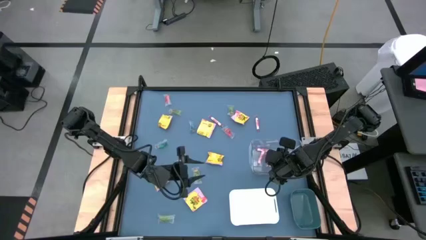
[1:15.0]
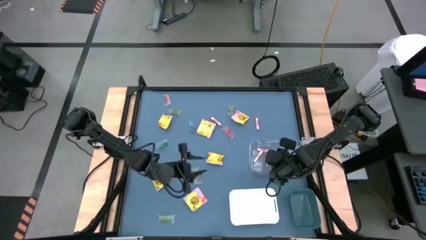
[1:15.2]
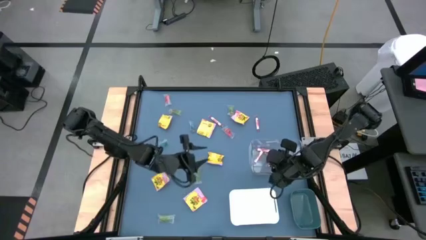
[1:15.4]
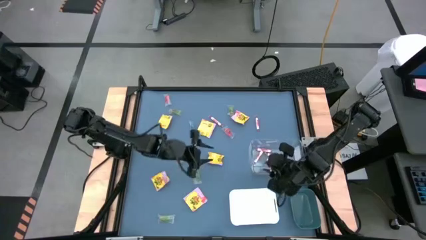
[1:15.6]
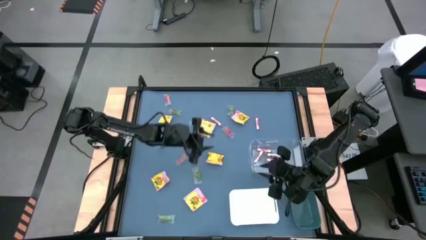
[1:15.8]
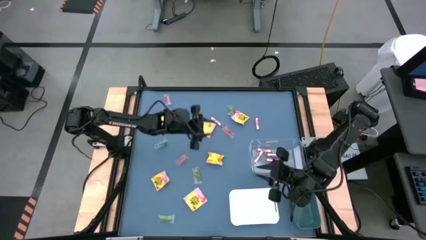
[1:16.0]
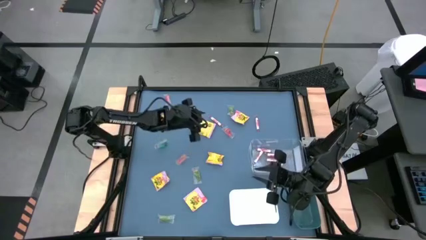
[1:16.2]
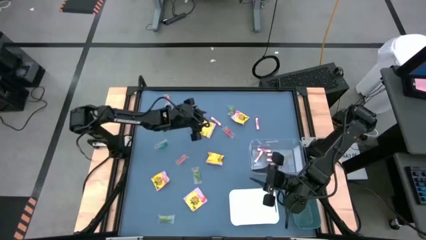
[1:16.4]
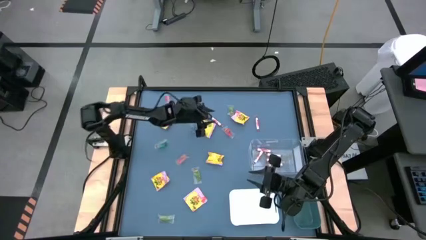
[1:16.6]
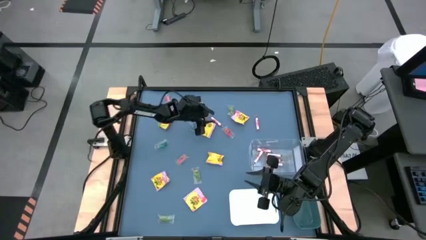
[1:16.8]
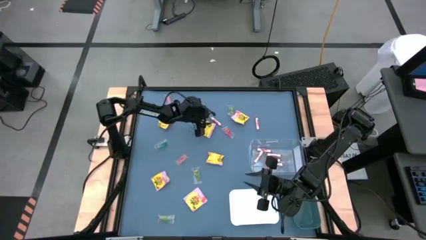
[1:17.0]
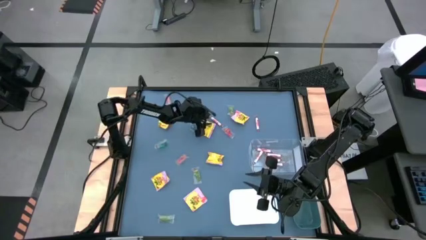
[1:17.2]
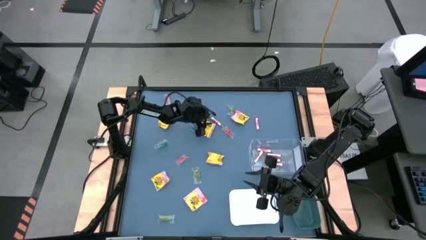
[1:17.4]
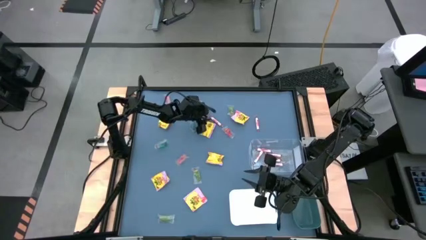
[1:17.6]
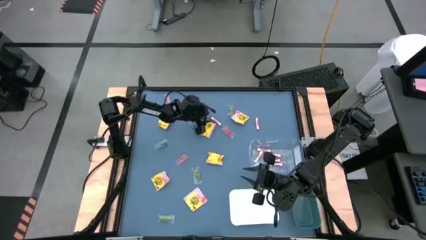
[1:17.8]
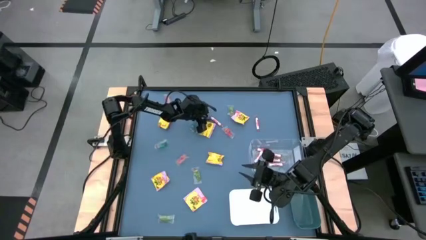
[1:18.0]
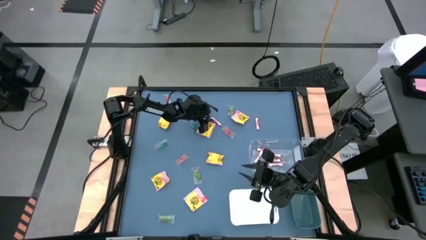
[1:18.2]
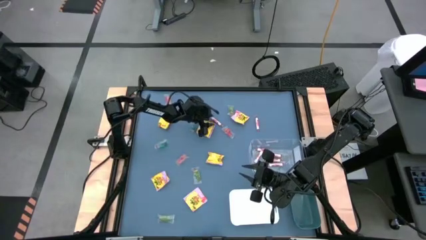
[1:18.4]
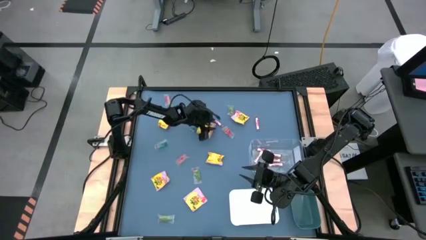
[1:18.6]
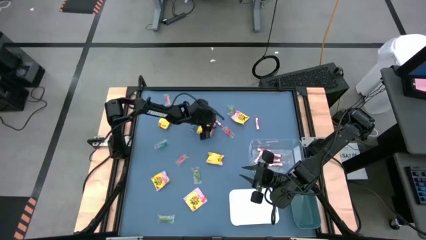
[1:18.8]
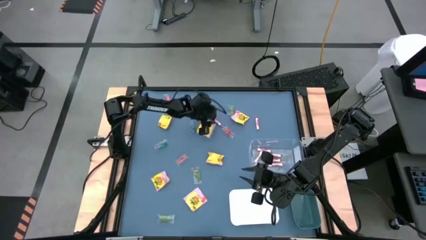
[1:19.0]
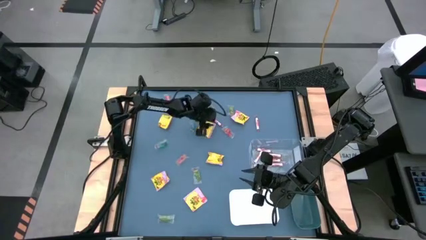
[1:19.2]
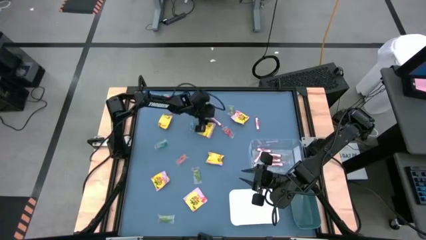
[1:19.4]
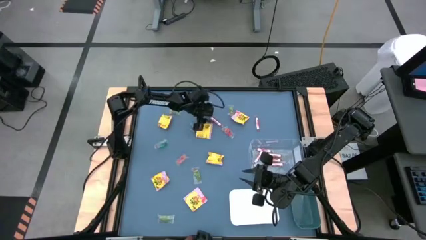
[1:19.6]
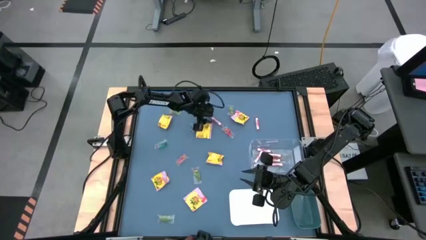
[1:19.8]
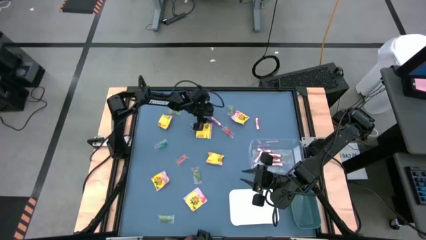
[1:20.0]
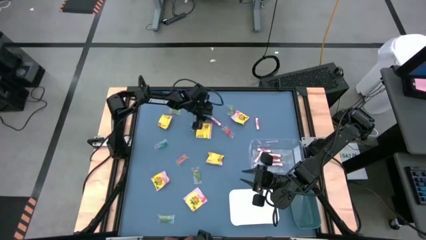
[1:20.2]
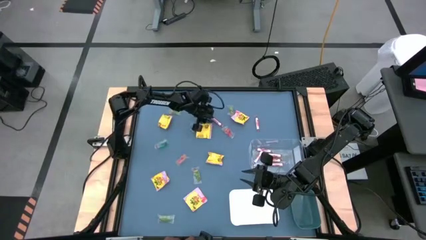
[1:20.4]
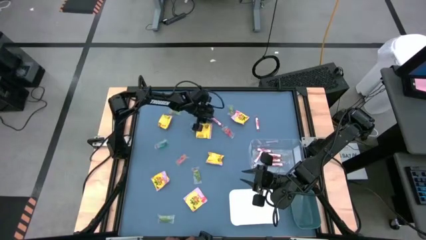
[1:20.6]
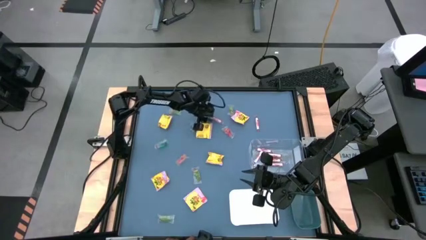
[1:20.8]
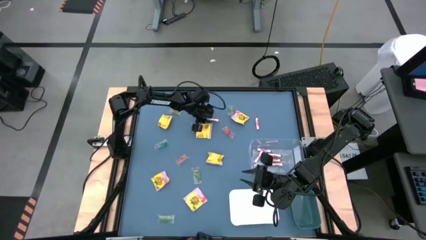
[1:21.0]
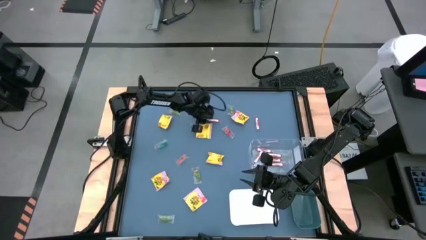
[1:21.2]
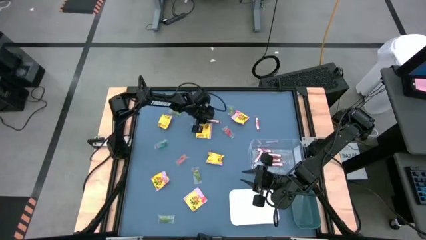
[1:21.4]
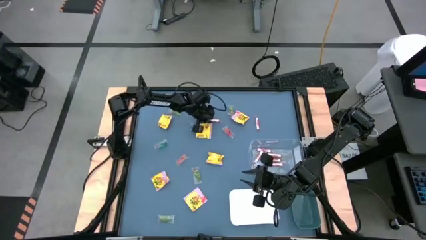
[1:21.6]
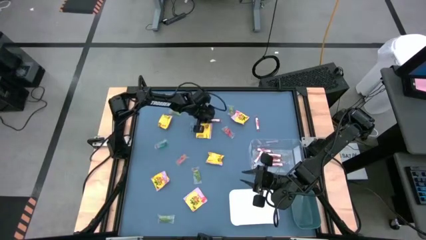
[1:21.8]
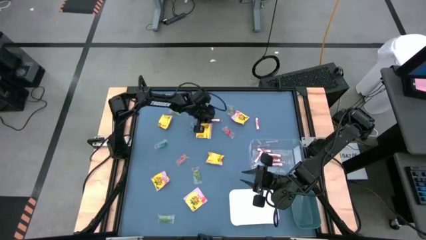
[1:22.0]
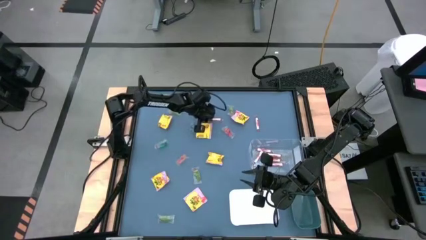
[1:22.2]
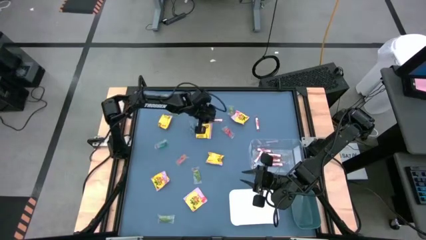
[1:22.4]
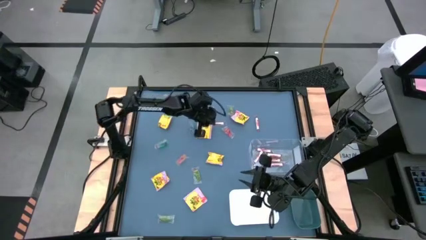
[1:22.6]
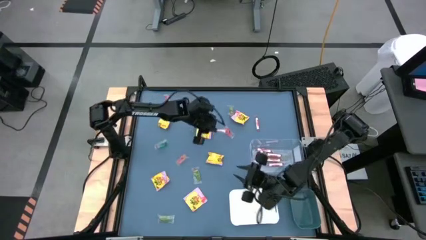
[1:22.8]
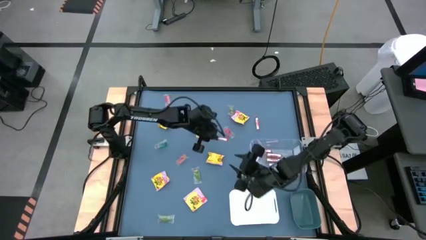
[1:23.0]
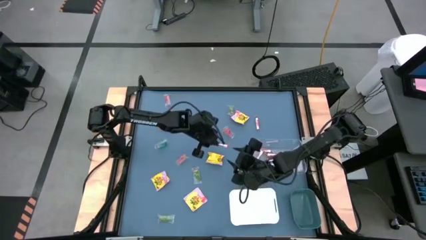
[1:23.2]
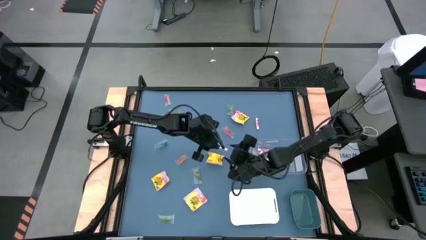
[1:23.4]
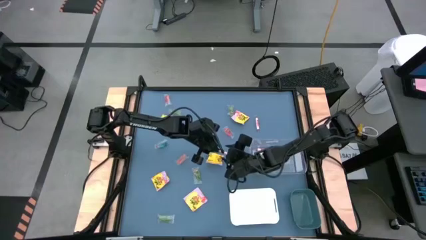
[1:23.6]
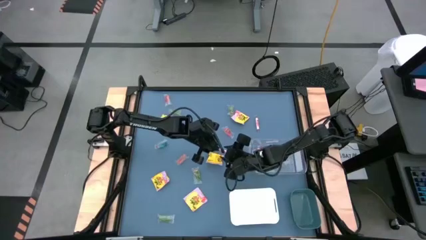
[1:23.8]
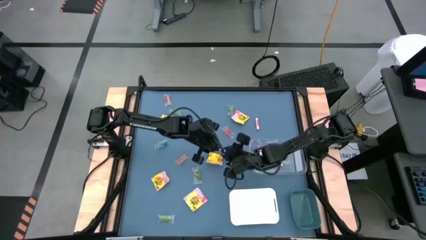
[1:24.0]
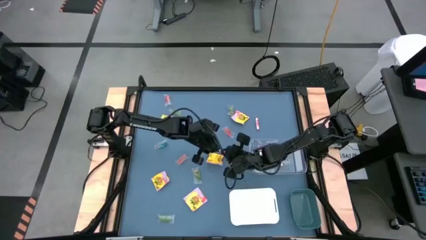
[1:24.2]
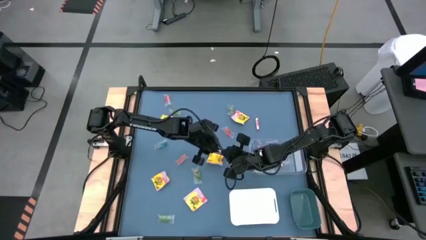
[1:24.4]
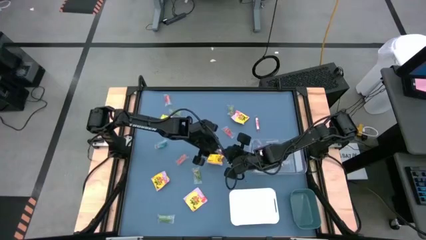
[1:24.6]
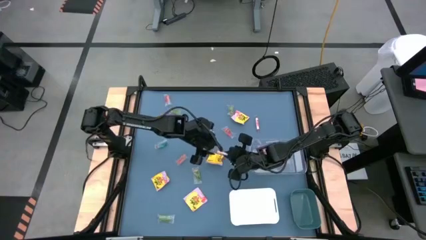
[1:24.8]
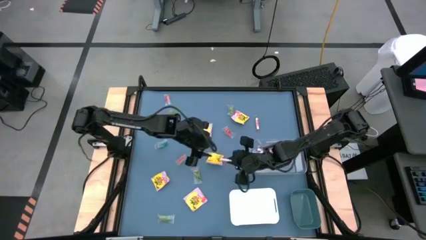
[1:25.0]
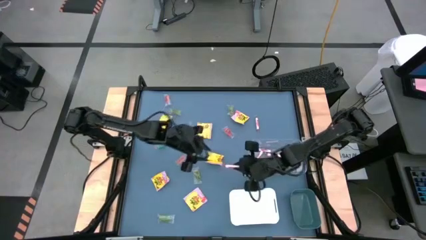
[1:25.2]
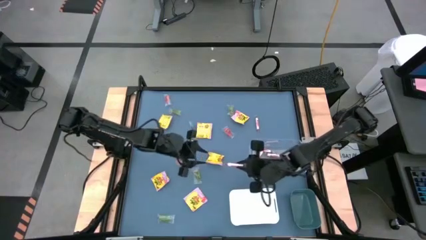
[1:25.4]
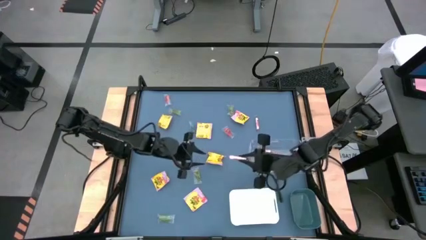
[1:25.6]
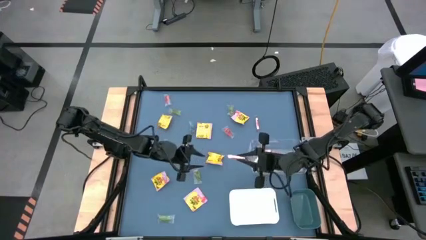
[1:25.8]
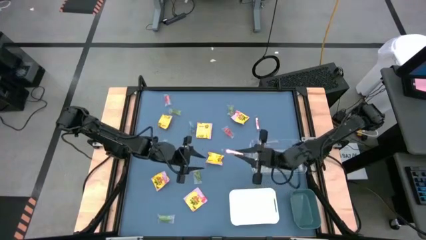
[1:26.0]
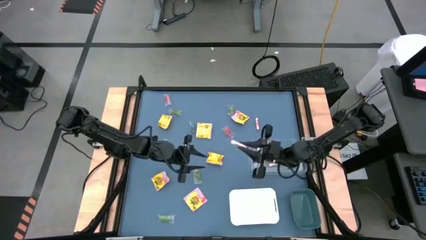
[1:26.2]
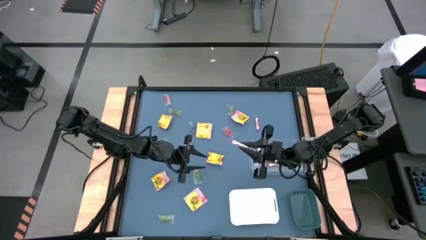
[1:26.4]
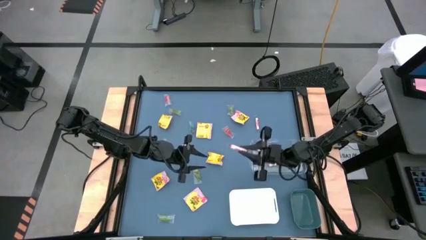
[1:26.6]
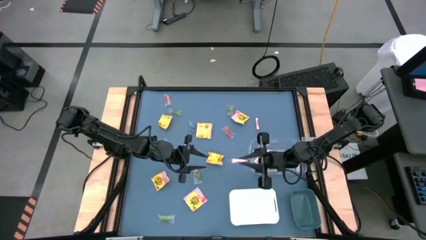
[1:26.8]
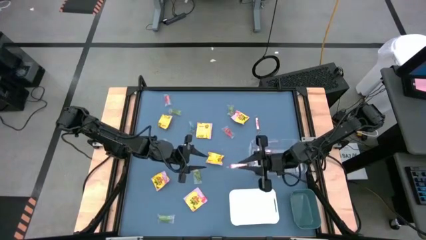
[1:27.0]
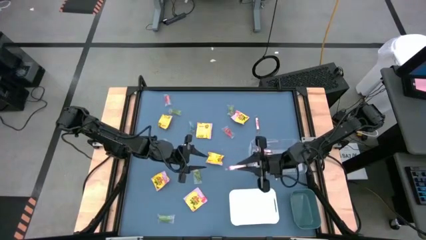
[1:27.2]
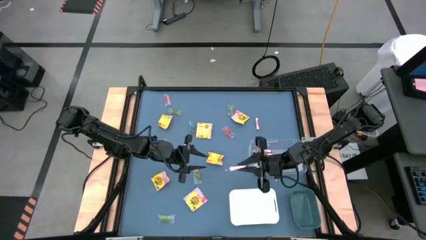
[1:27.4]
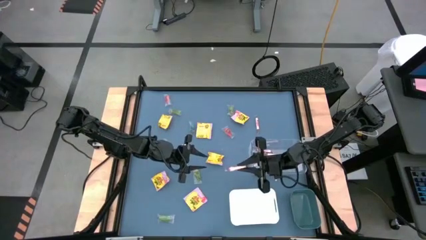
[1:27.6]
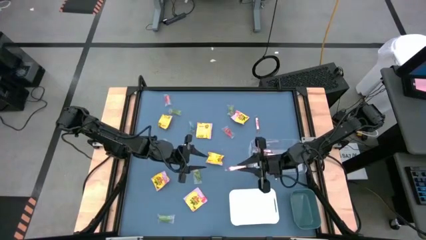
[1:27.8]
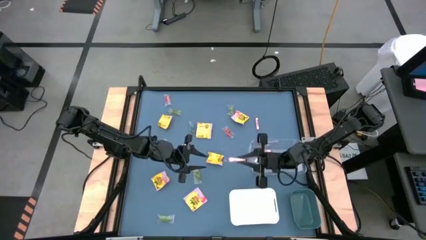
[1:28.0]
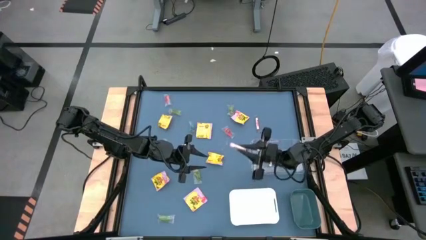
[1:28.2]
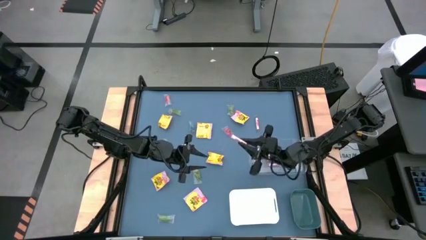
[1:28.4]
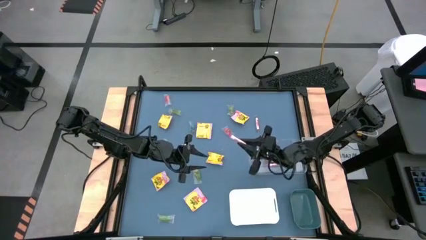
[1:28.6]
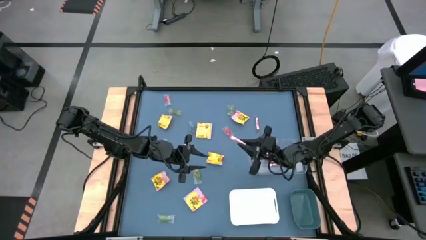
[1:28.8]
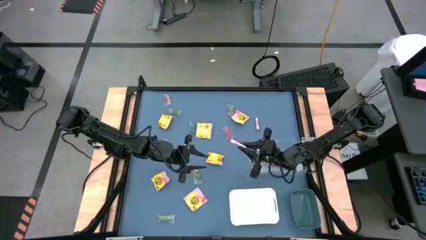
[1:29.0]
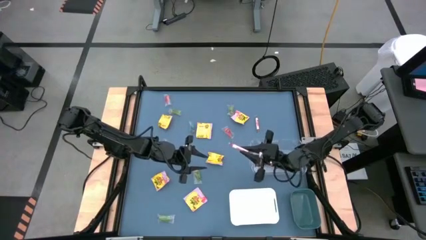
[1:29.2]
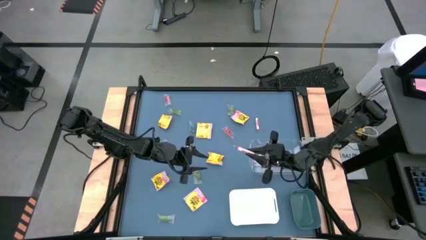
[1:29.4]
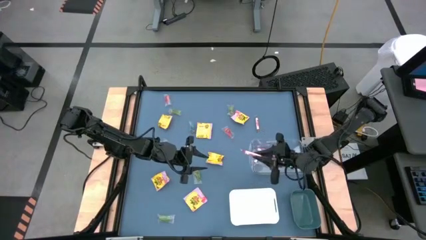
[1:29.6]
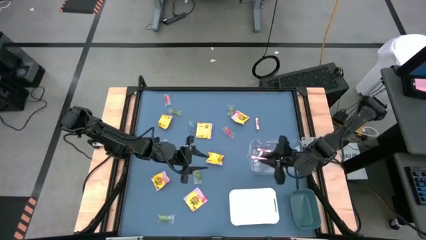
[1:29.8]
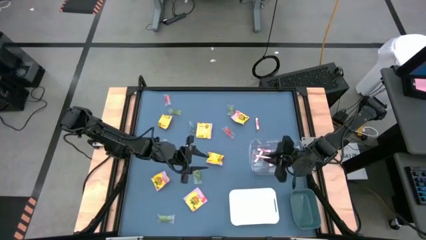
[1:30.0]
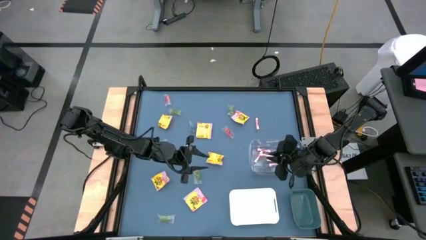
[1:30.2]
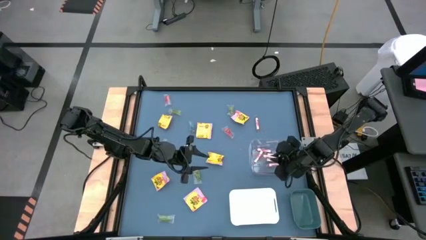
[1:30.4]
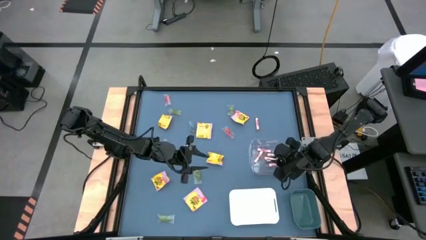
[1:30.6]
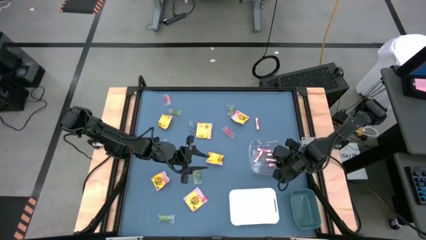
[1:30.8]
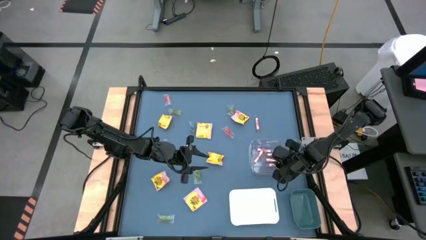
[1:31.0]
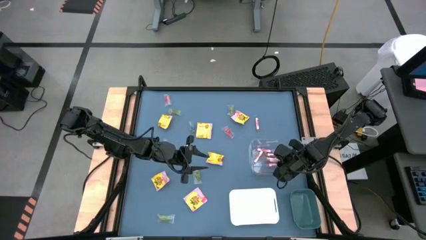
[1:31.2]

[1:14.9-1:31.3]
Task: Sort candy
Put the transparent candy roll into the transparent bin
